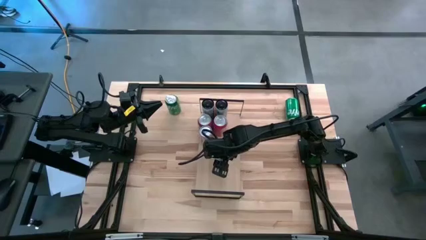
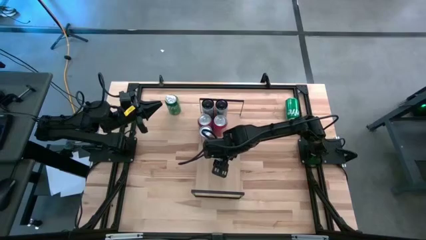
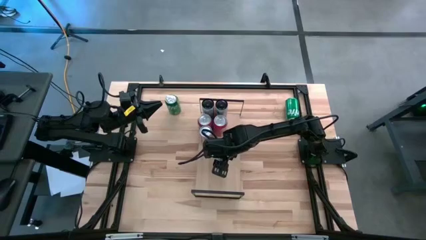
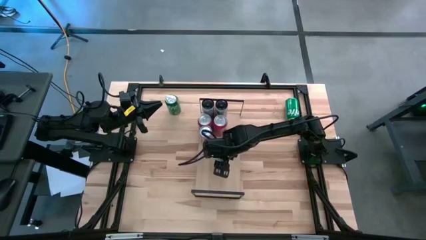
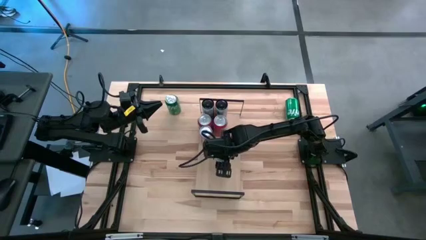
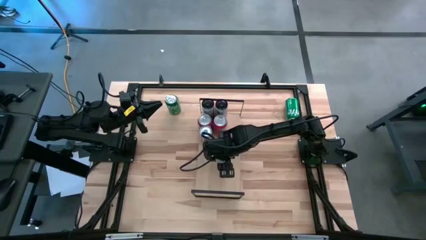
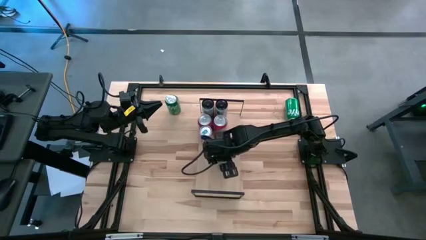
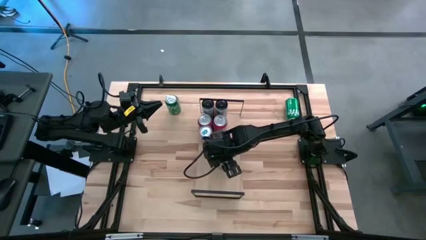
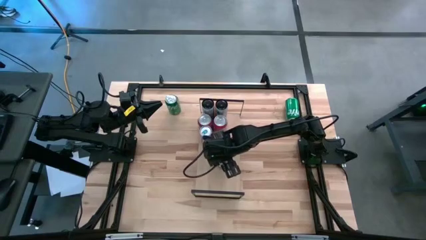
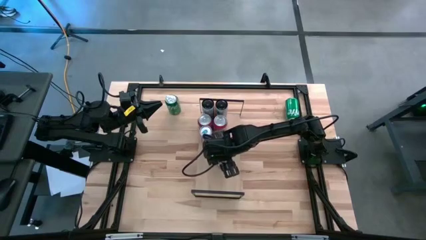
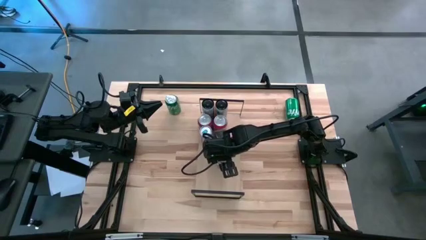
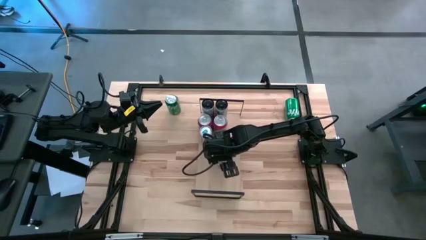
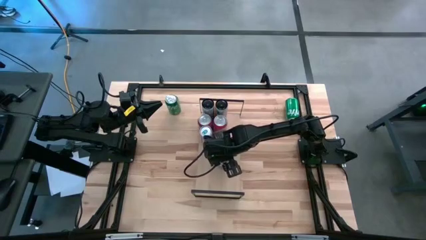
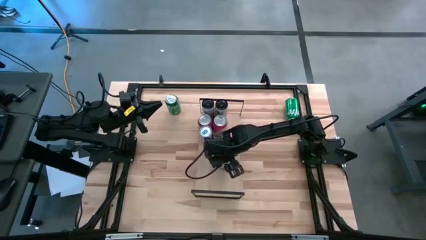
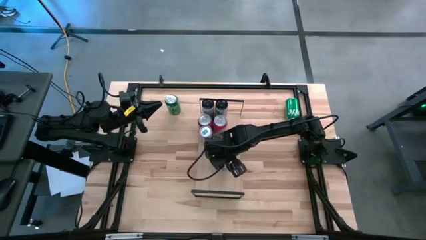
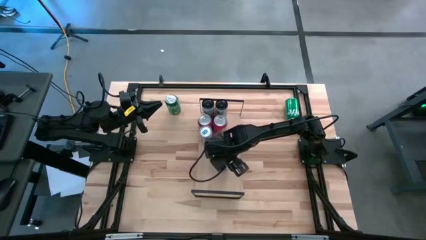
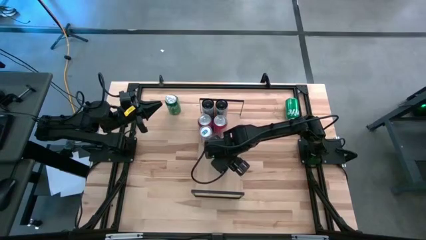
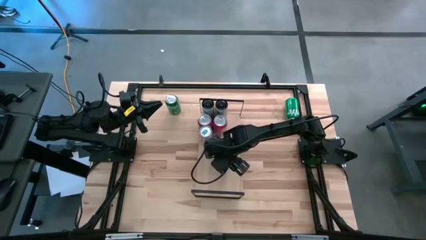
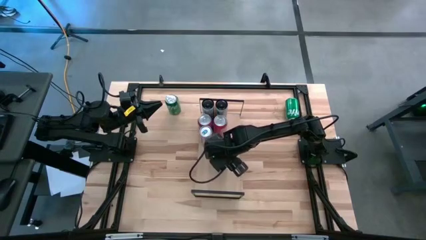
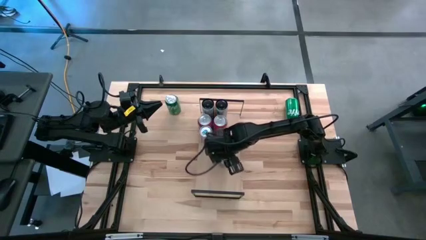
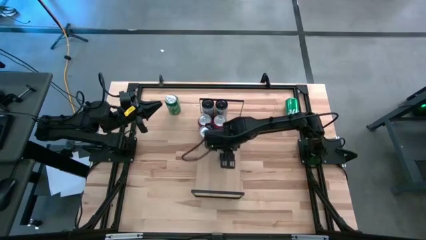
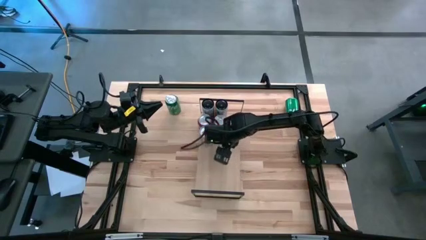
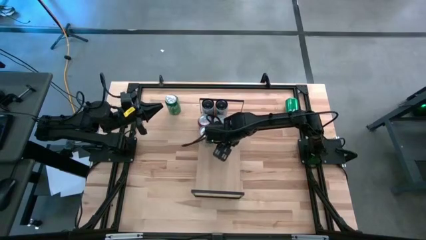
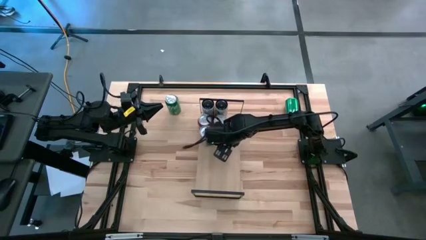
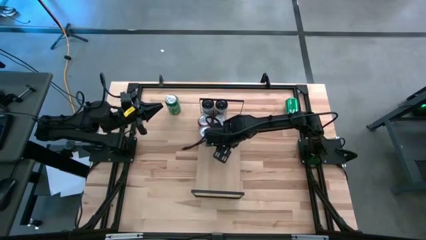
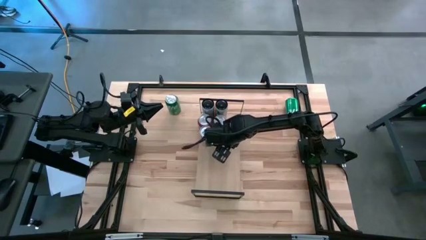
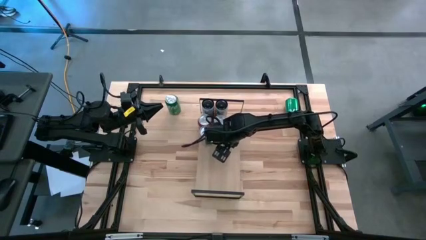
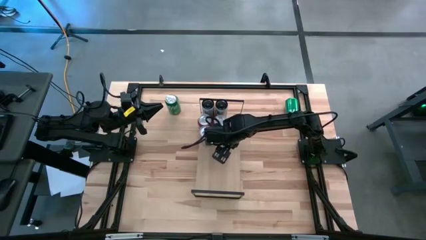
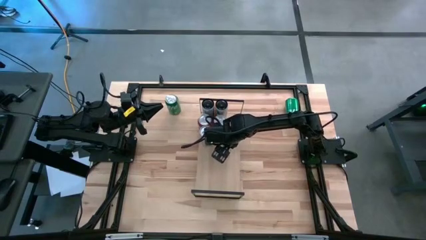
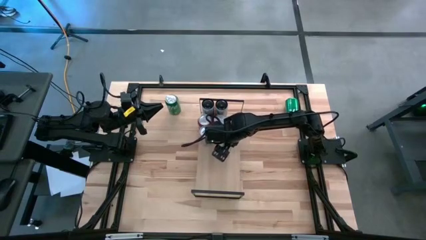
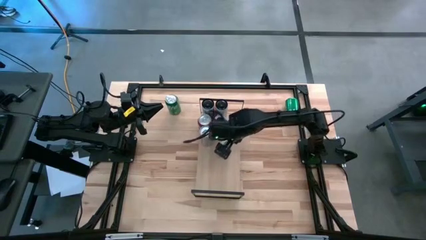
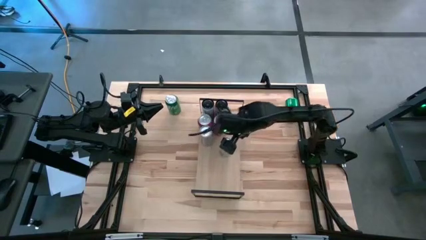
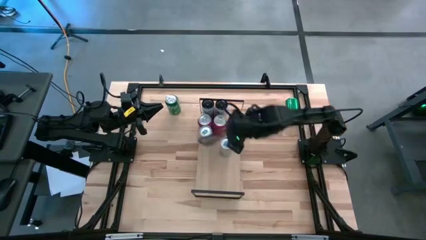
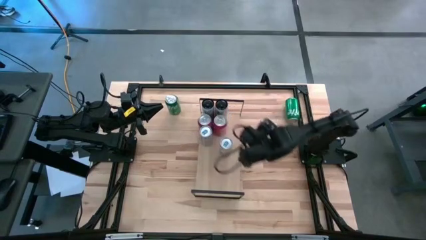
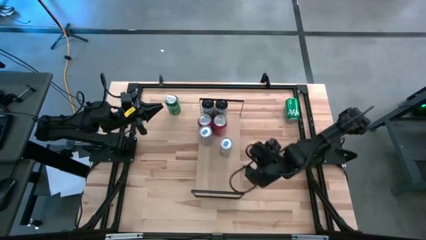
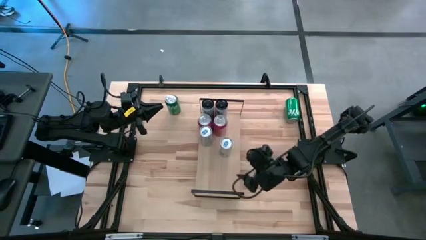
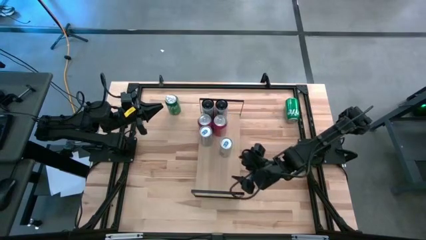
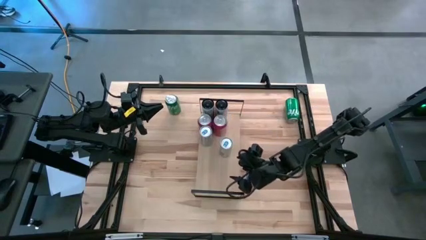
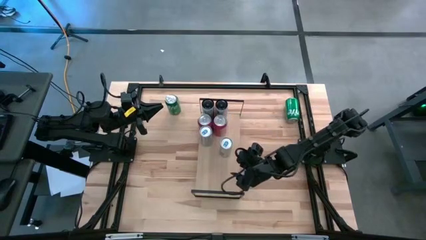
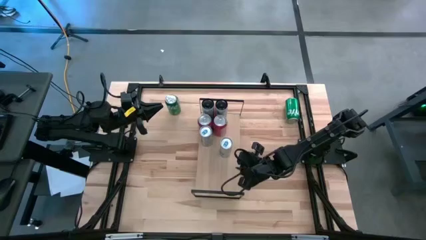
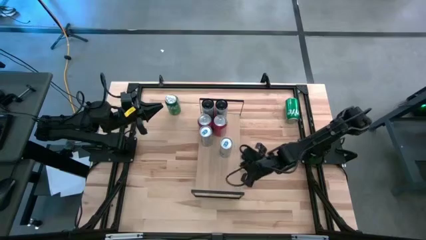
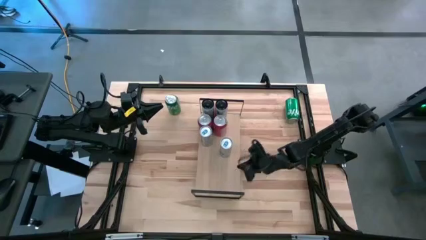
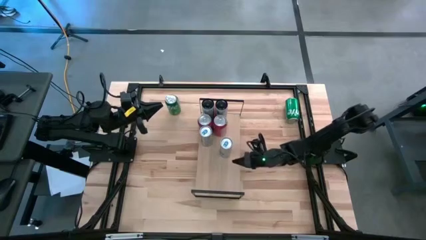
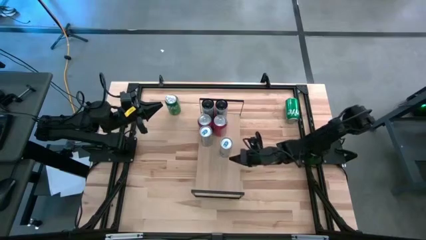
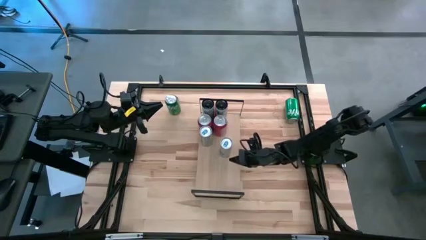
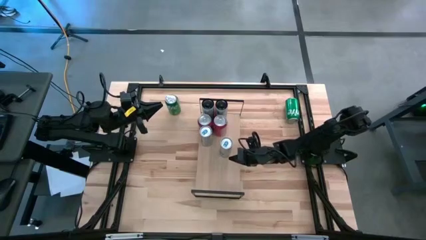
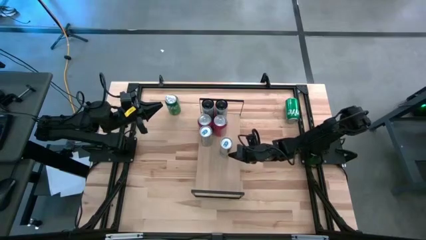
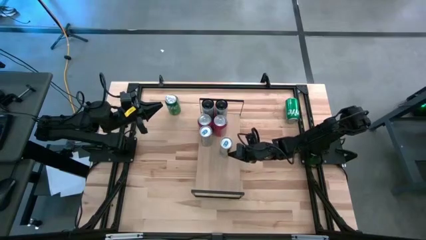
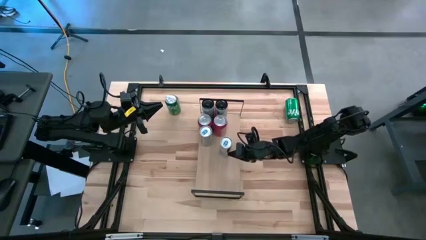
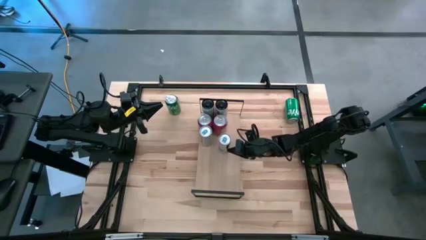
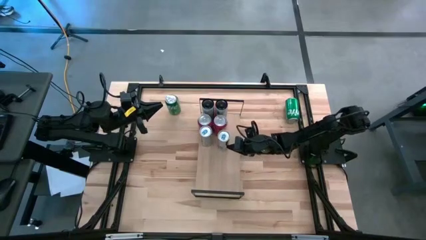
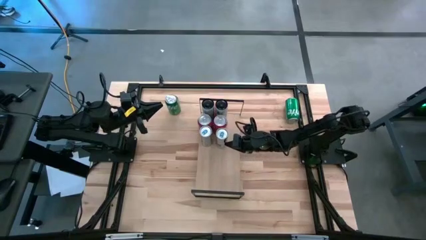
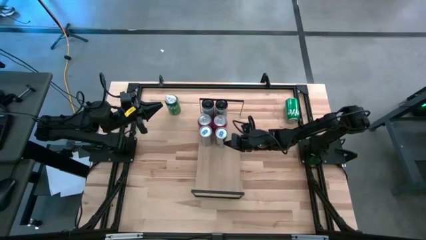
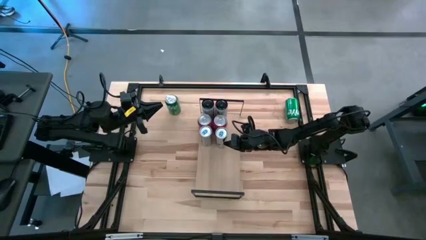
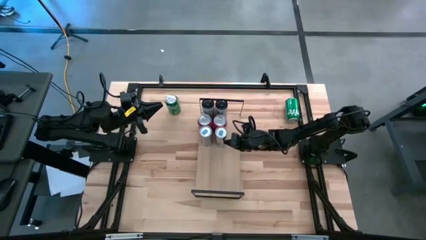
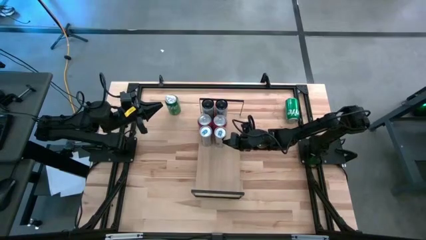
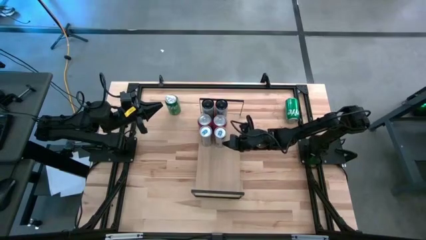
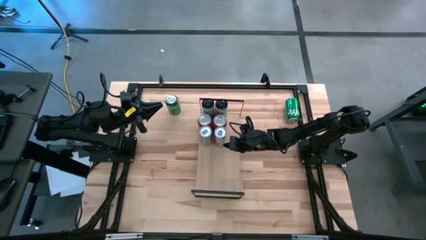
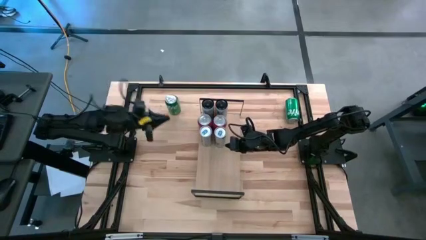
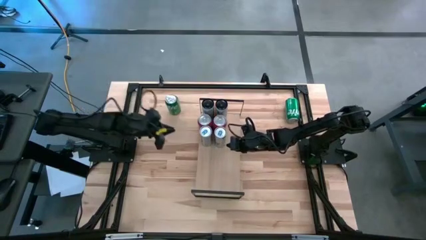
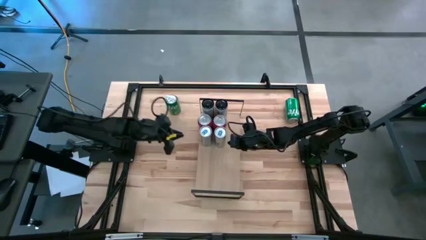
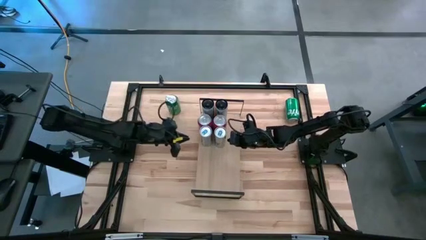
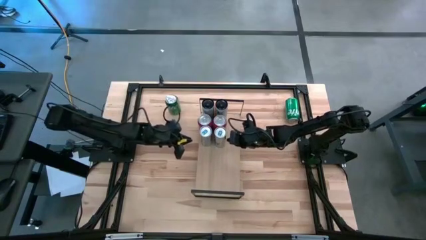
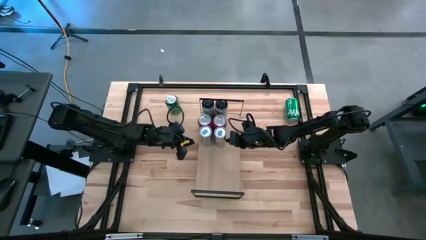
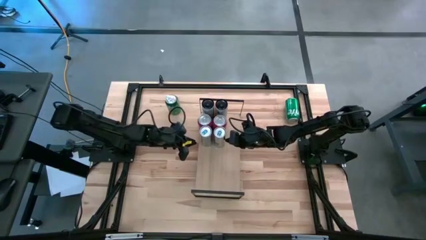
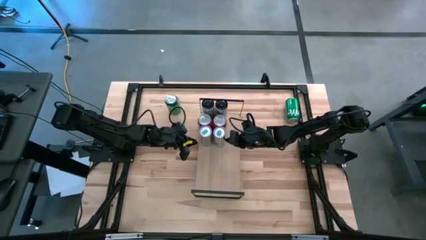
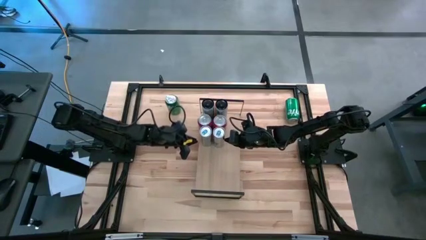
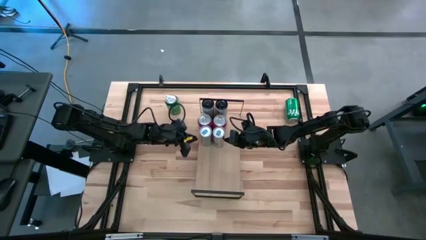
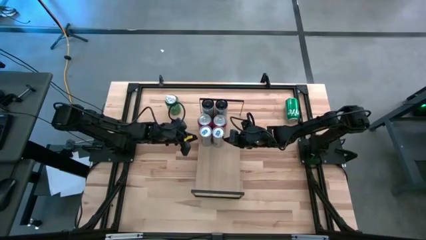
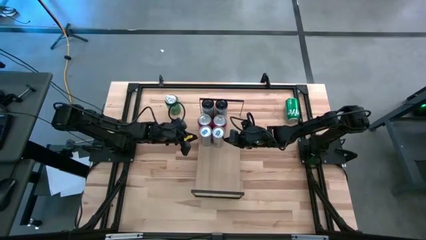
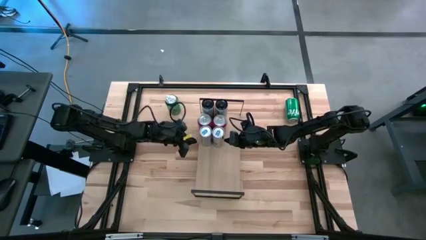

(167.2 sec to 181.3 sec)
Task: Place canned beverage on shelf
Put the blue soda can, aligned with the other blue soda can on the shelf
